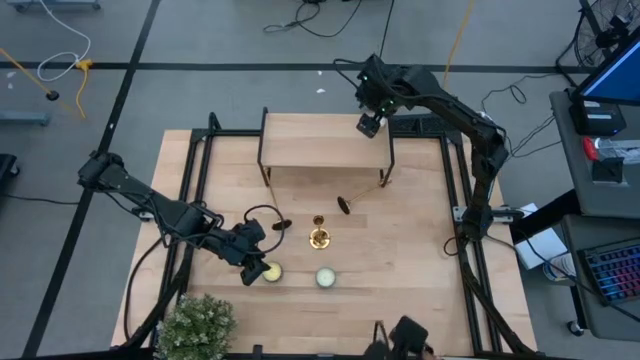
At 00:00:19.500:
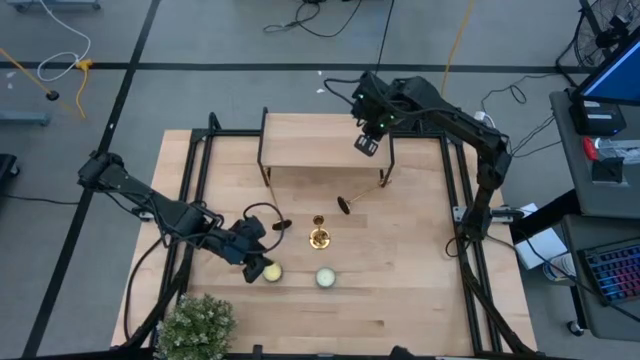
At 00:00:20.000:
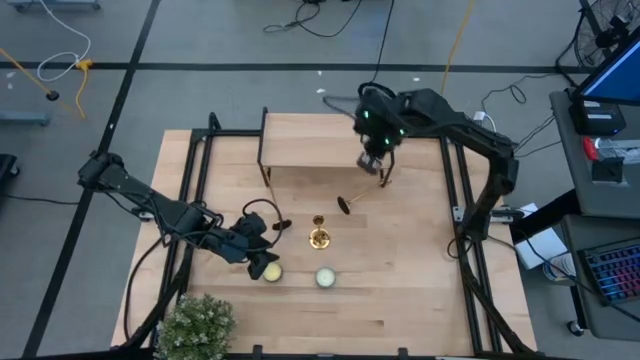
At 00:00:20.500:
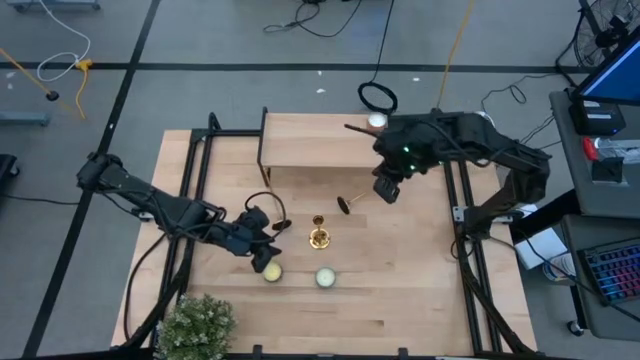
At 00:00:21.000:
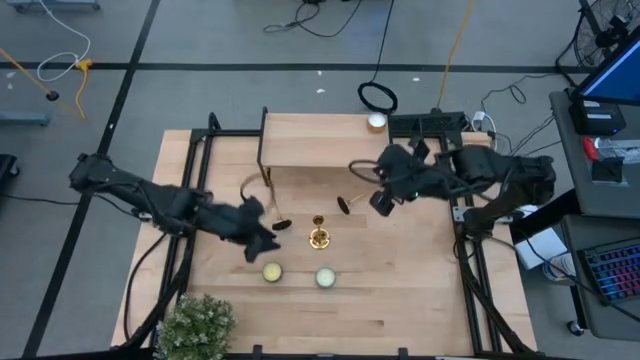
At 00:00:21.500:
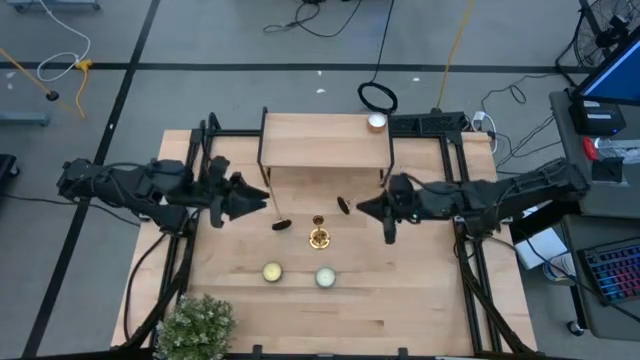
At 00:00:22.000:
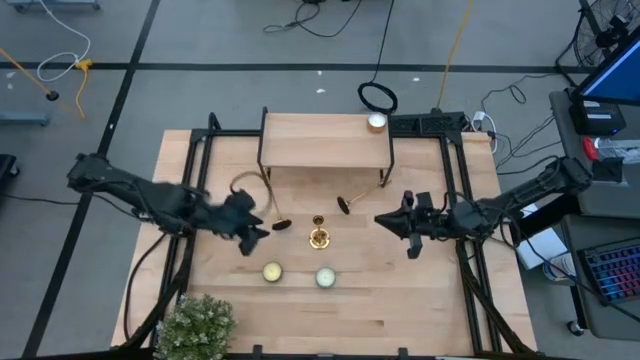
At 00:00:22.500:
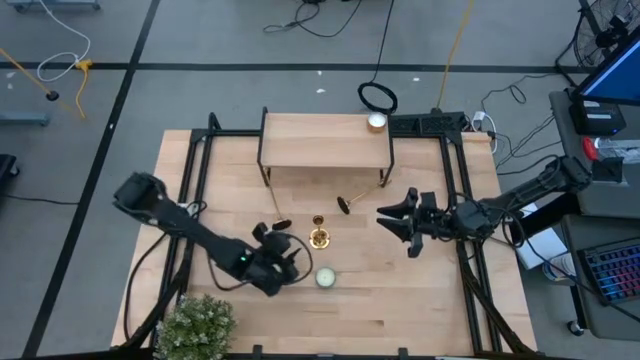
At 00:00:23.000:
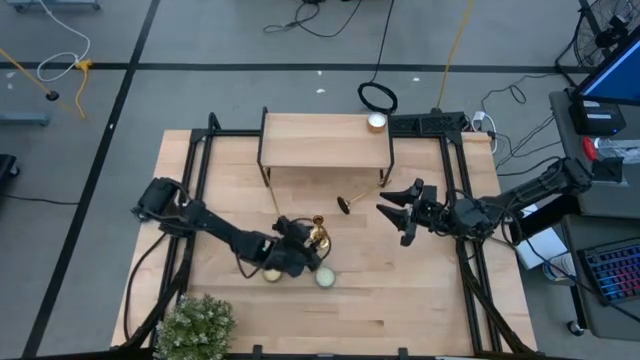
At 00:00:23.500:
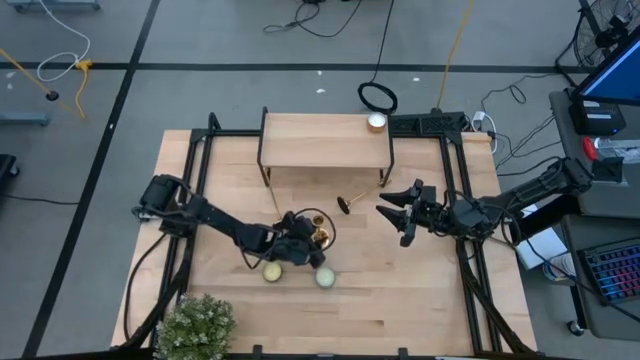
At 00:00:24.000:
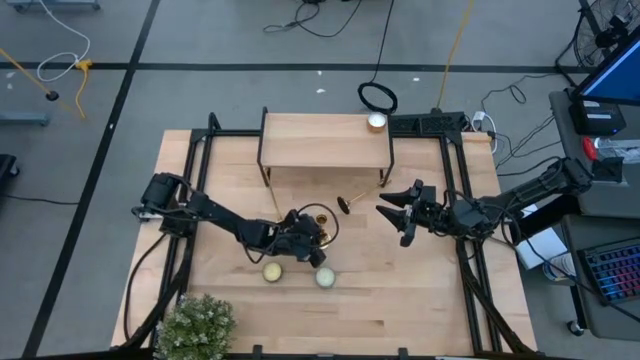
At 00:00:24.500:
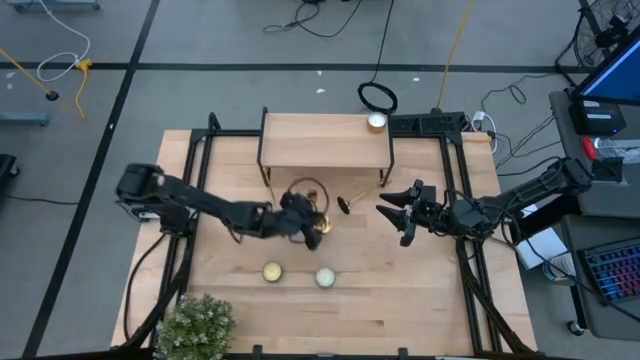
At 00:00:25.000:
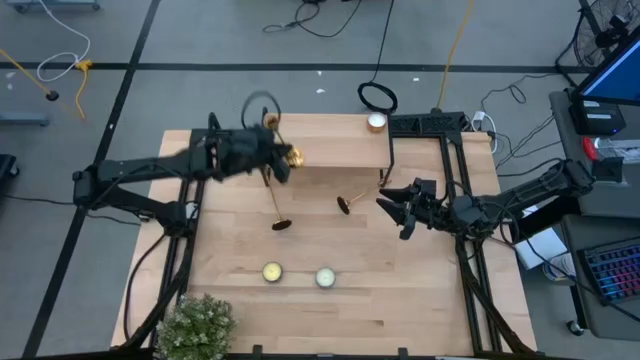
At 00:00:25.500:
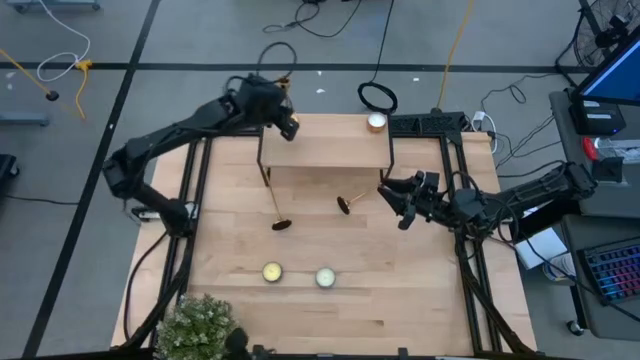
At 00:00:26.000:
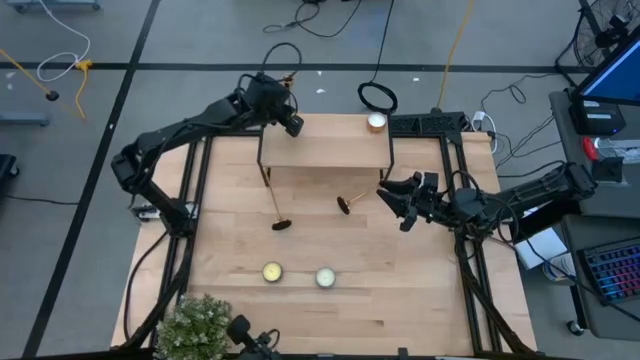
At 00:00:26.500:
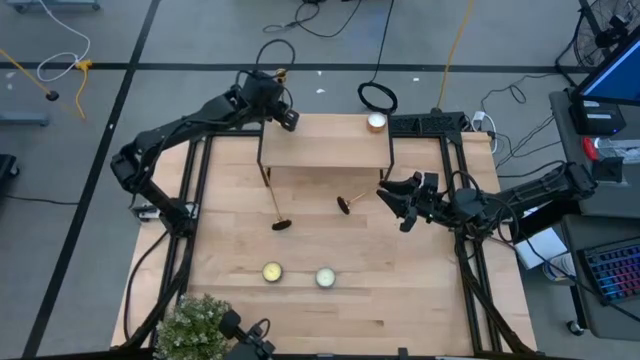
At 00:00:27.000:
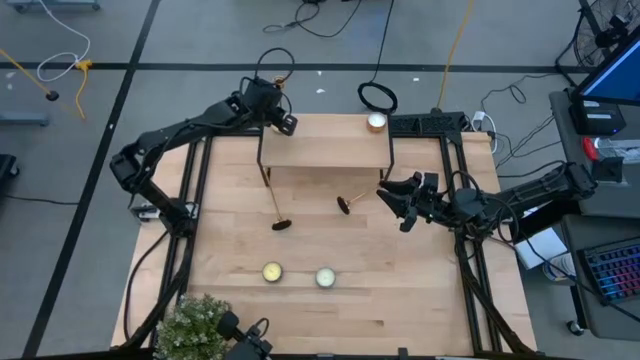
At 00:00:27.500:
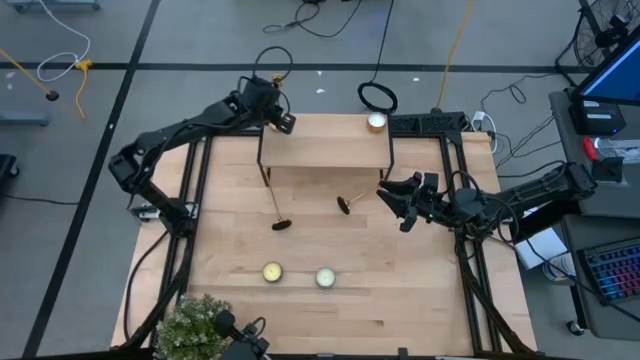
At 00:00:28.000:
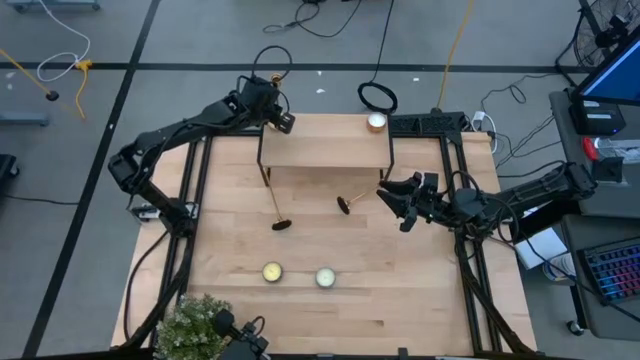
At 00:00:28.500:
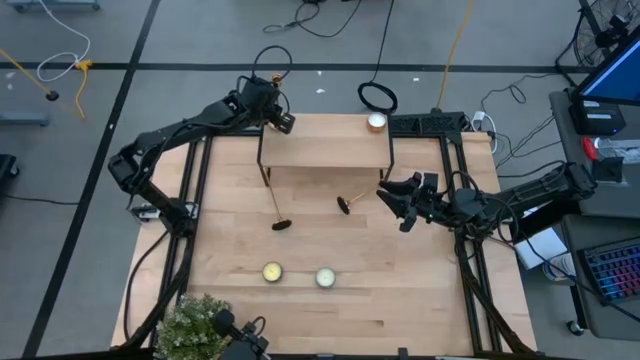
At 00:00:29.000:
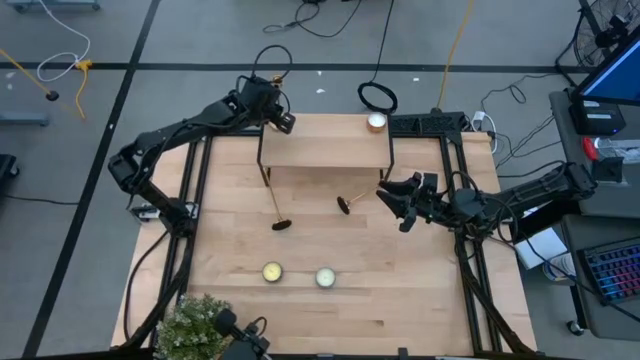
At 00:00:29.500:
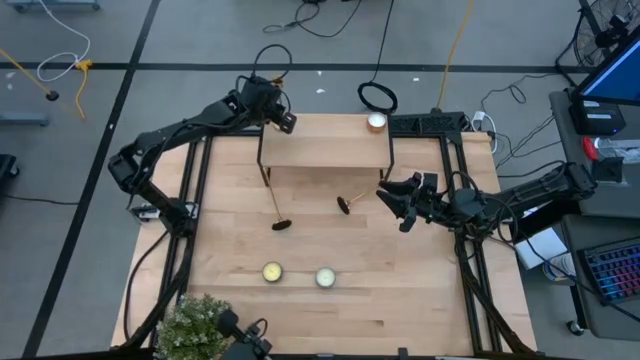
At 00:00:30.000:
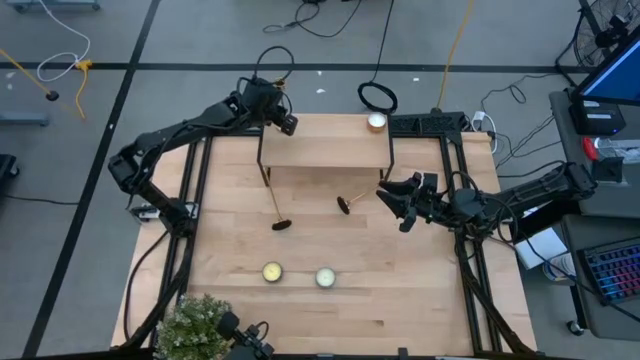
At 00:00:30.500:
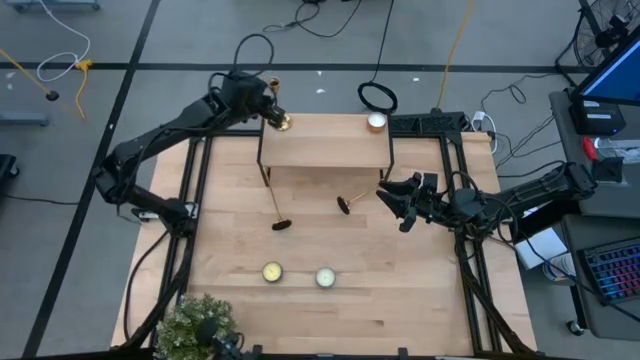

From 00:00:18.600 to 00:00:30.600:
Task: Pick & Place candle stick holders
Put the middle gold candle holder on the shelf

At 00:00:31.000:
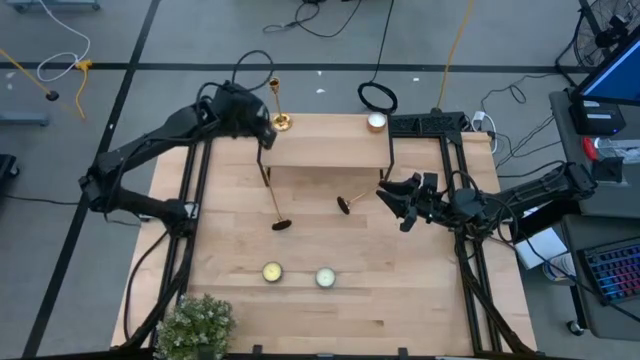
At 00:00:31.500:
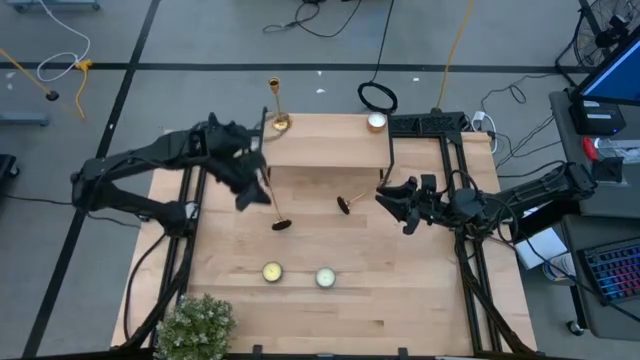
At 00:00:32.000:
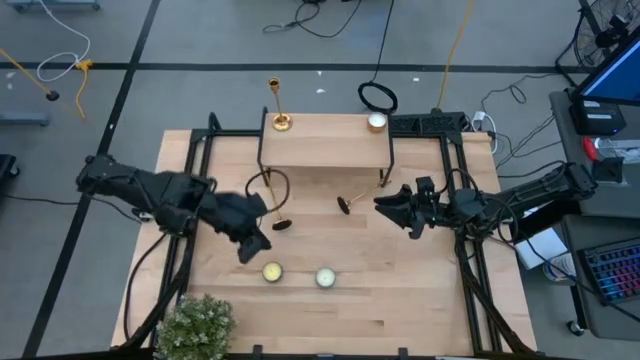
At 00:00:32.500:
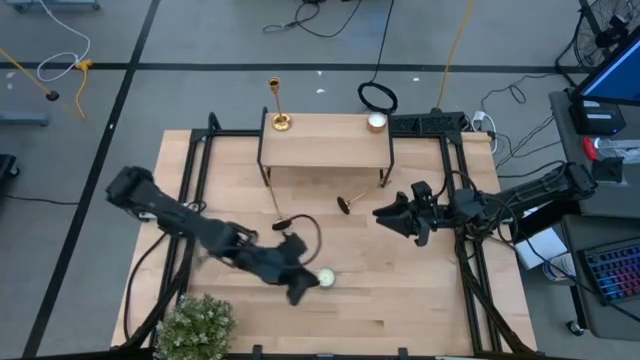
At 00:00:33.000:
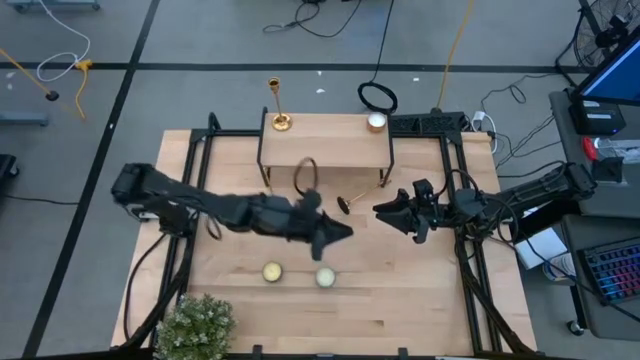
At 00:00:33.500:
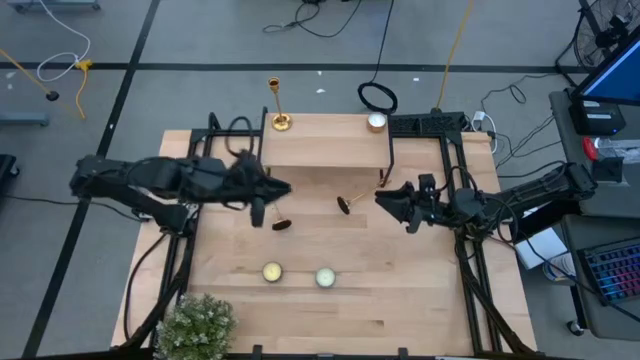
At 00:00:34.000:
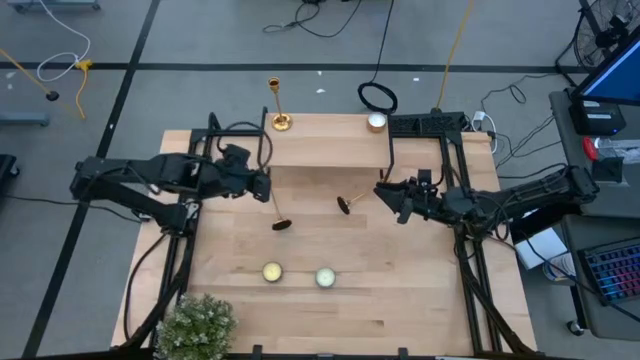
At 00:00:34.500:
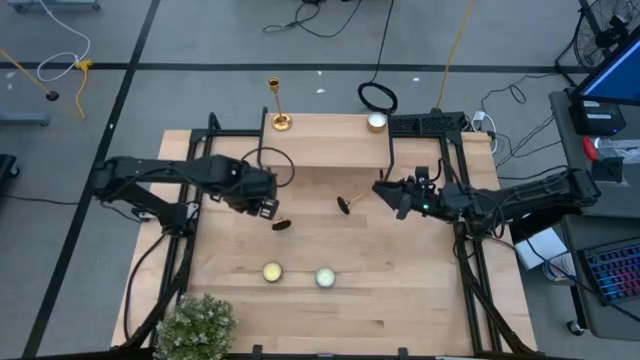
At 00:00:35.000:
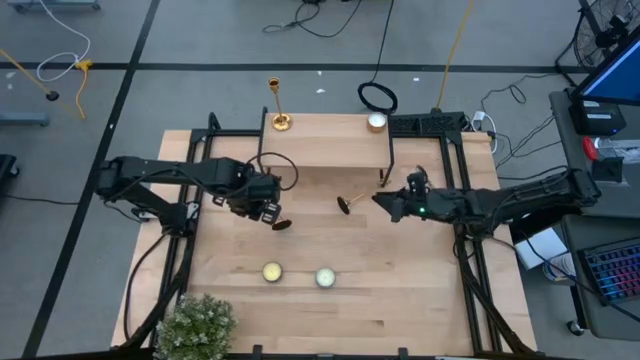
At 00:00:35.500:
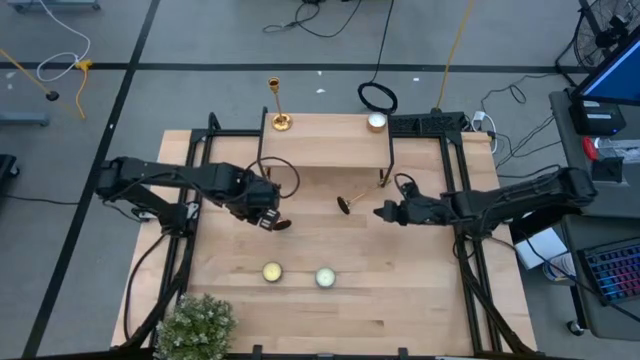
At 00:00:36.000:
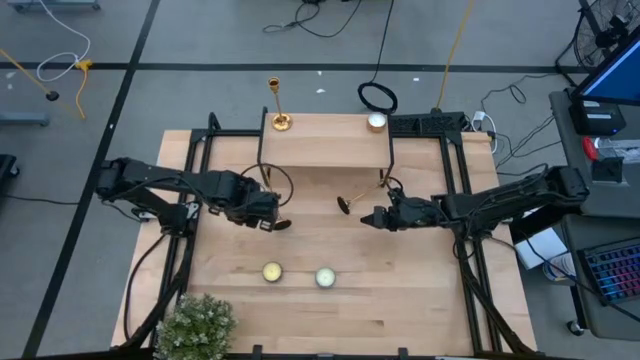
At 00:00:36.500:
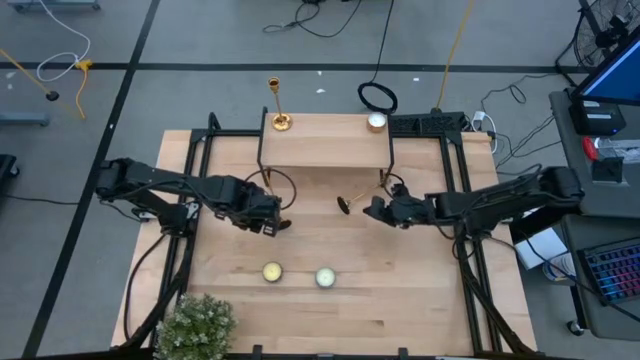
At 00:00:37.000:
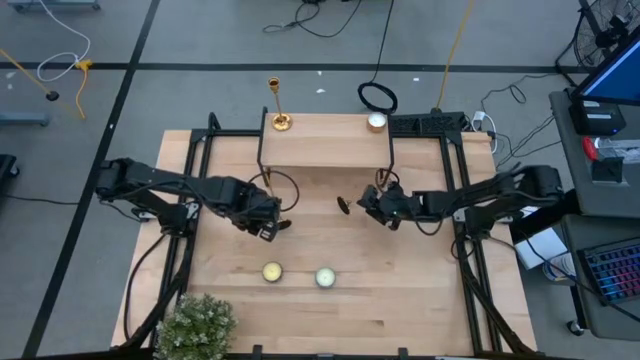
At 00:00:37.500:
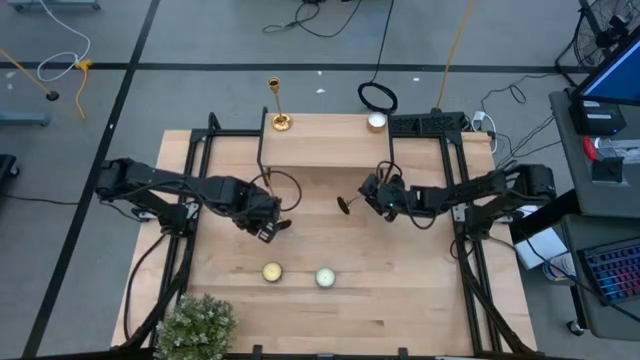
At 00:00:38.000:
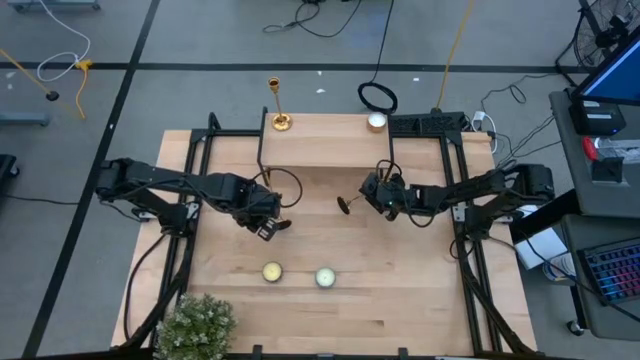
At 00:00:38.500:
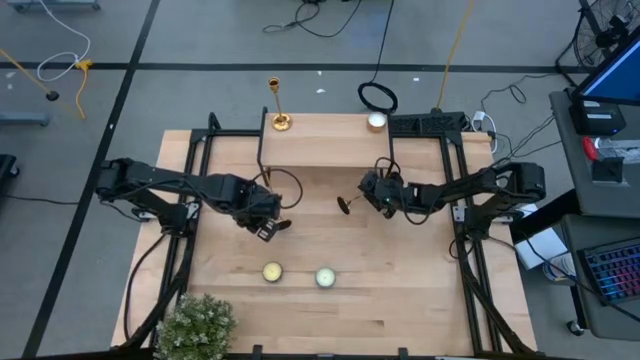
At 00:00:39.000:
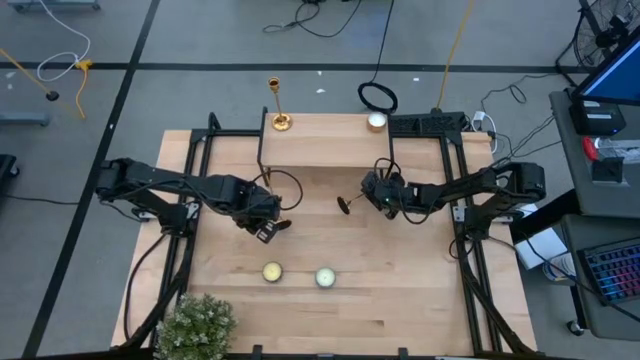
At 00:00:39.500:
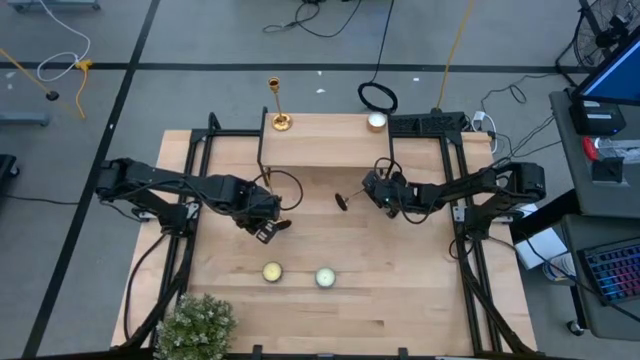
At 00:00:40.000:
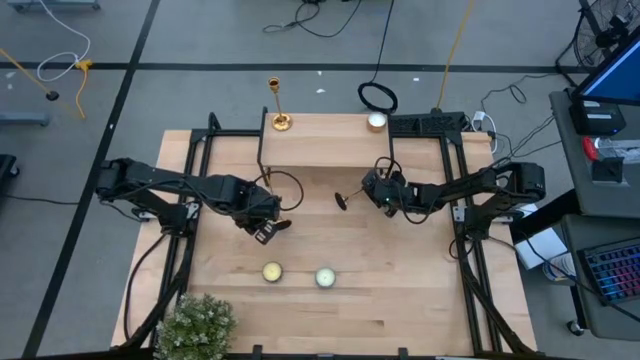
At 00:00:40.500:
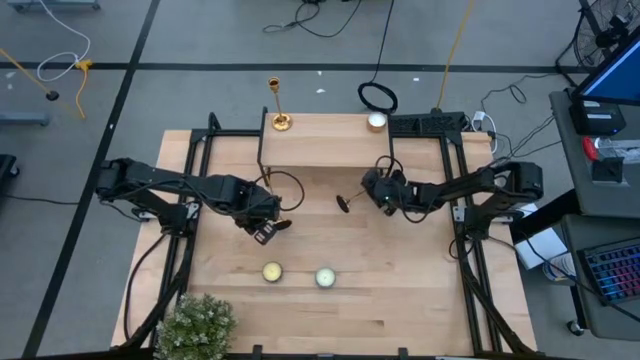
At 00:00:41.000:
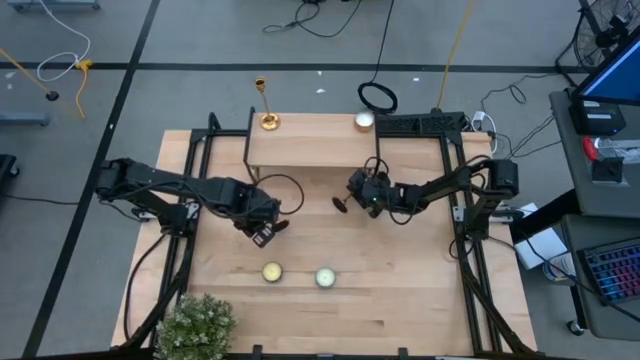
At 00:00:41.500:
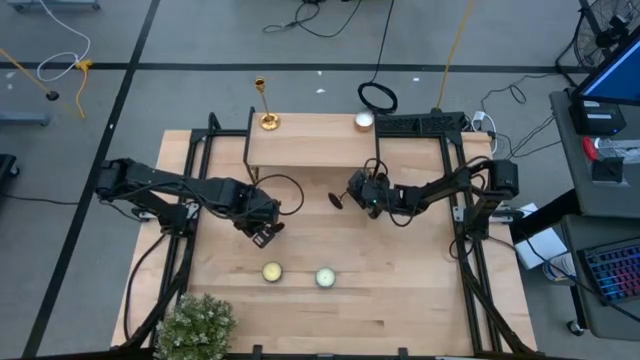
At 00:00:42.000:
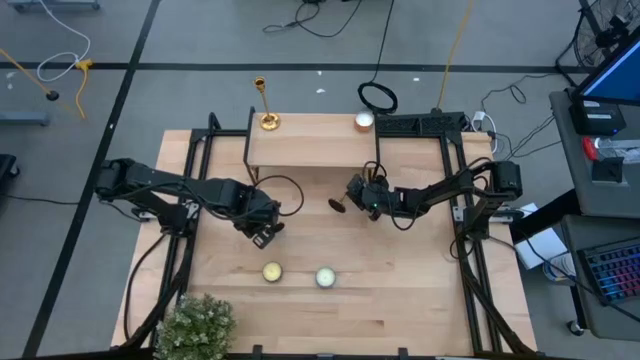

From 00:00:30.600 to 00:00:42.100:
Put the right gold candle holder on the shelf
